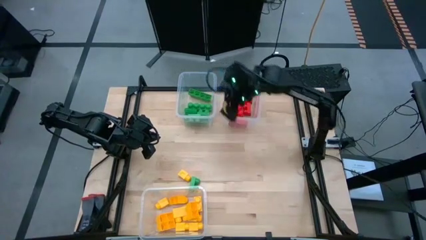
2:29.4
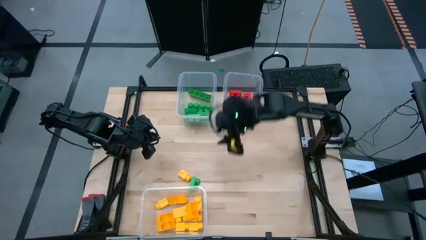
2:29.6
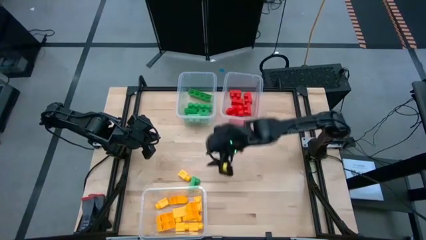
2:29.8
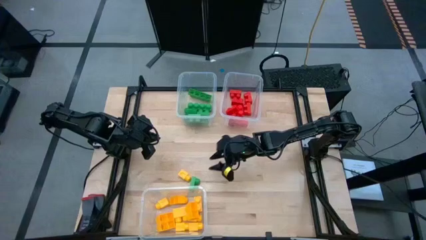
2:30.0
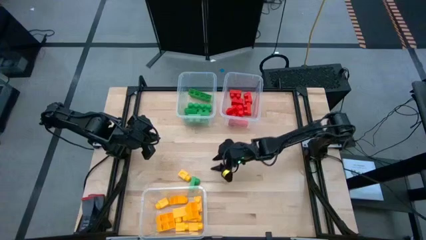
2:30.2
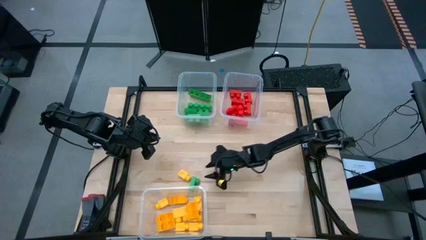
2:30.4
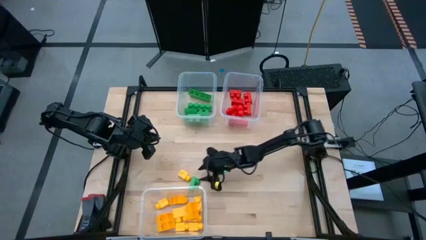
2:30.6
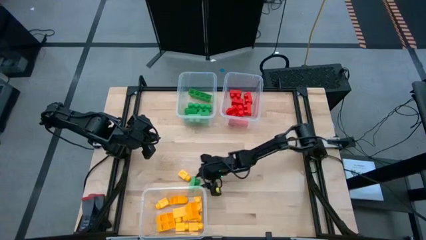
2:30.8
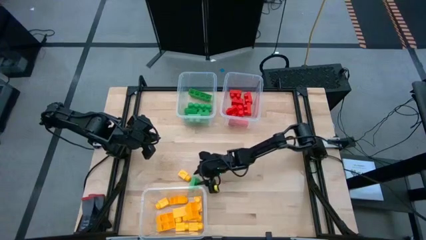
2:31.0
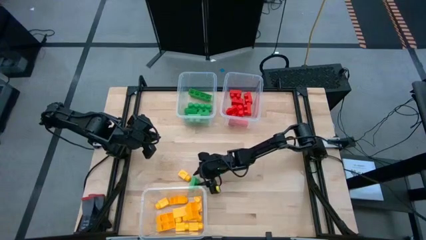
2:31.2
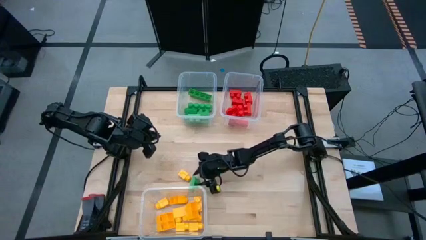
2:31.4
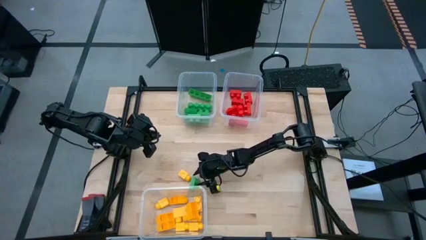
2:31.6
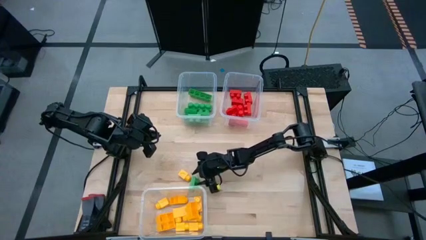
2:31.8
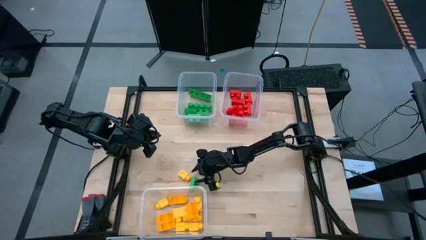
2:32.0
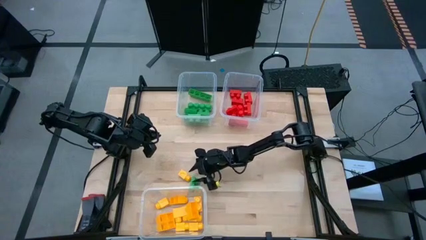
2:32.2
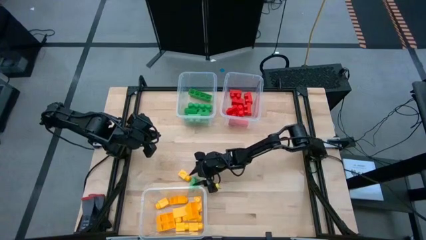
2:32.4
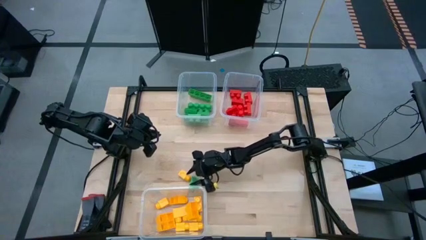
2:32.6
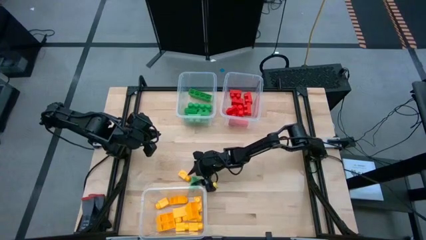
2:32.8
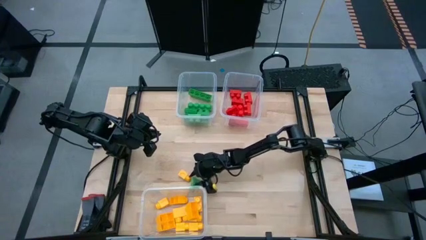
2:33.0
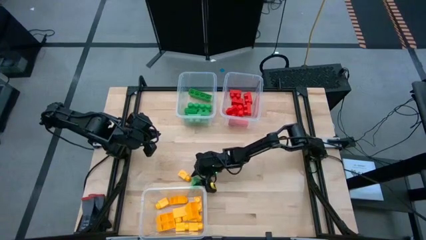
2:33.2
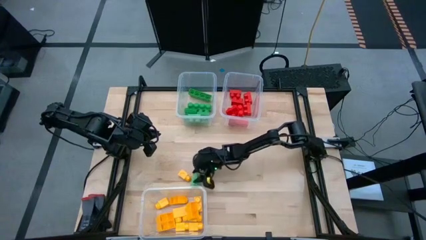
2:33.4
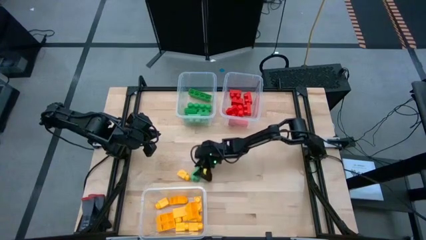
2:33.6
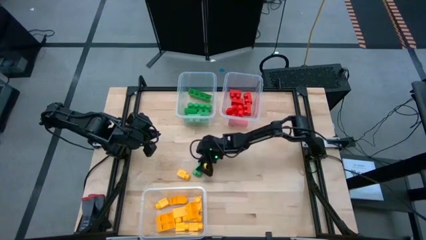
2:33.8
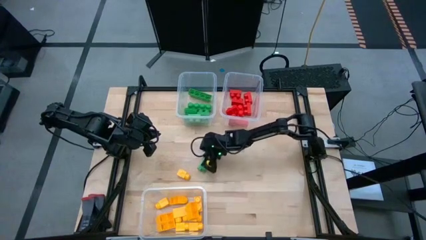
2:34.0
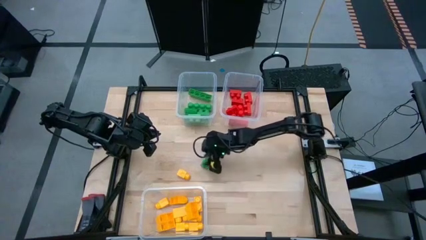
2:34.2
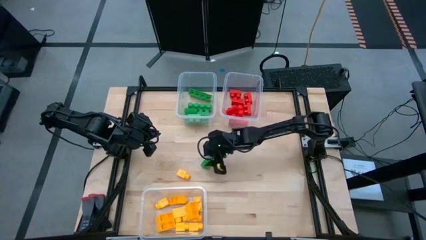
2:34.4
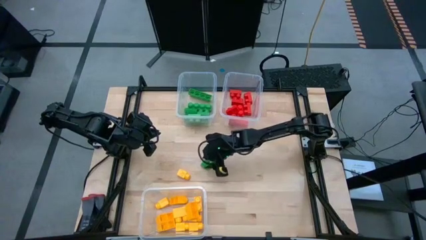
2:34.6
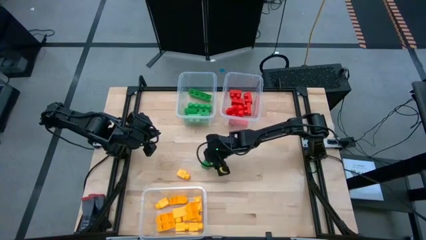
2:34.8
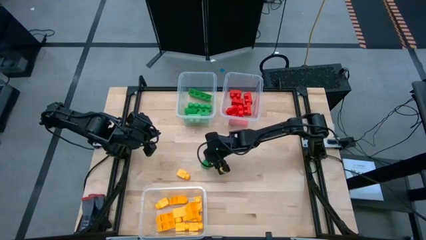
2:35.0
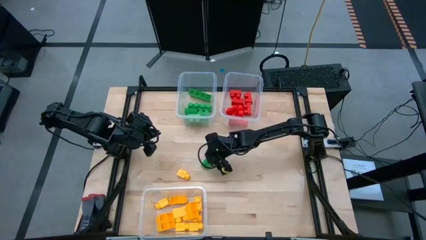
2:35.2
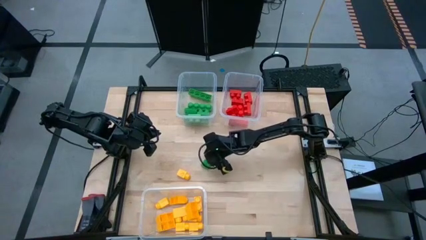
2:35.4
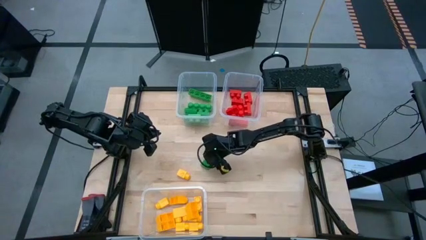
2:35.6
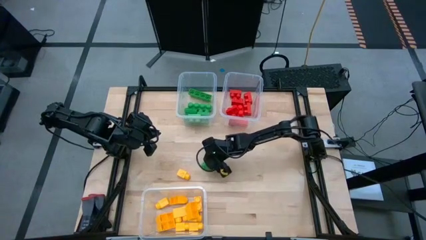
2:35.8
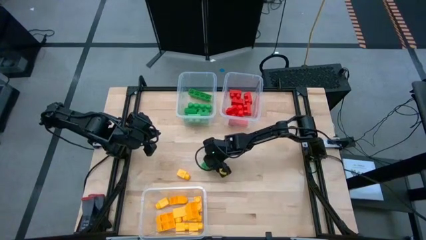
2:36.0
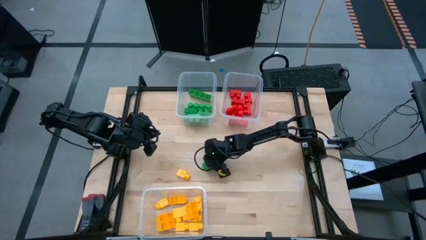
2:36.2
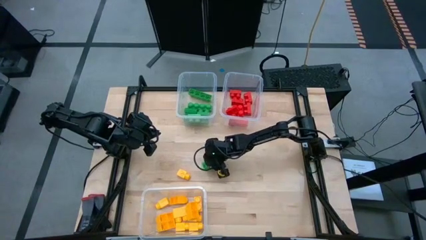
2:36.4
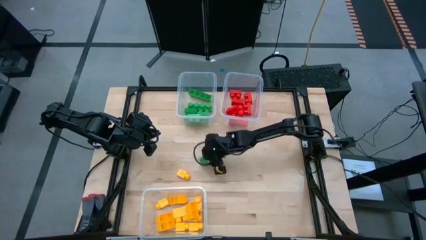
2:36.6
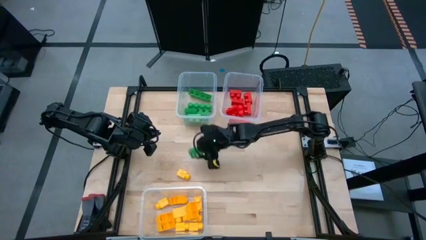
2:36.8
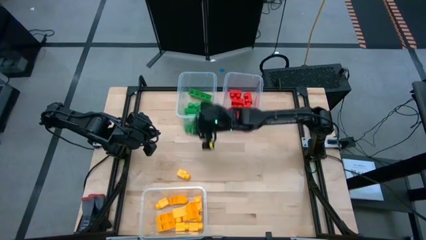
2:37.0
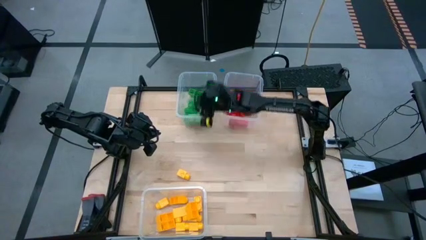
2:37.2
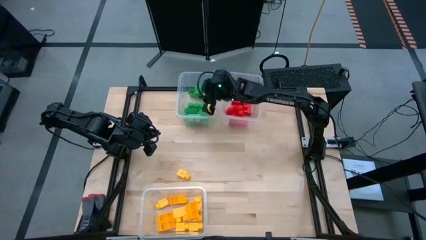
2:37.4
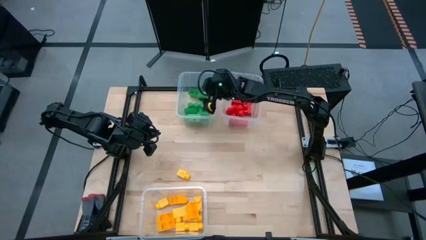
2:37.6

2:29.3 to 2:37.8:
Task: Sort blocks
Put the green game piece into the top left transparent bin

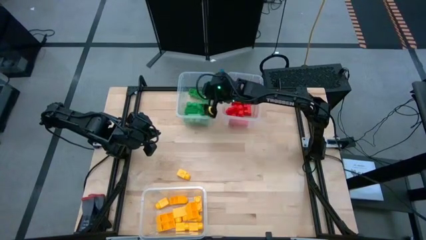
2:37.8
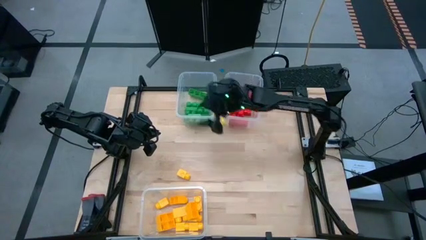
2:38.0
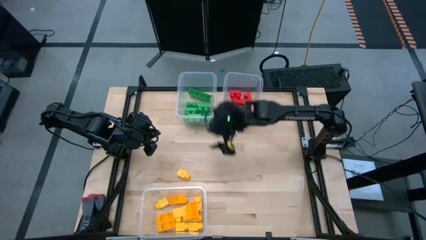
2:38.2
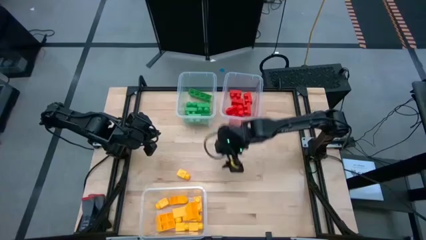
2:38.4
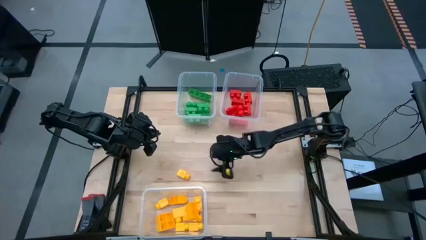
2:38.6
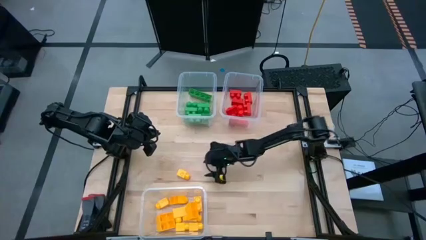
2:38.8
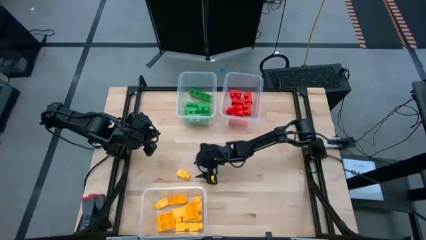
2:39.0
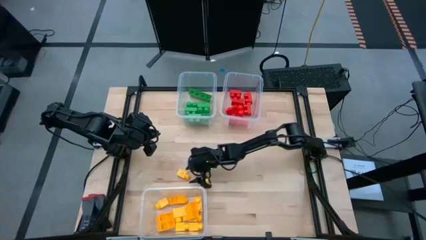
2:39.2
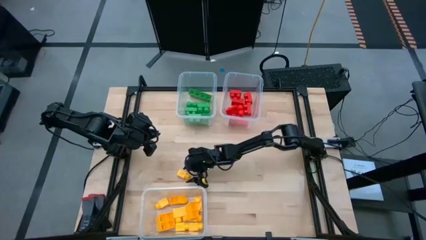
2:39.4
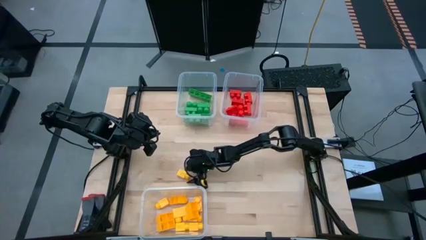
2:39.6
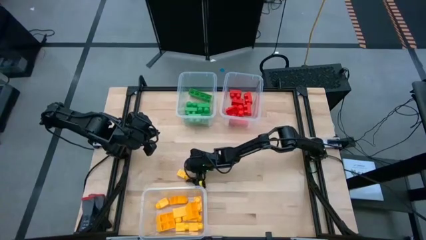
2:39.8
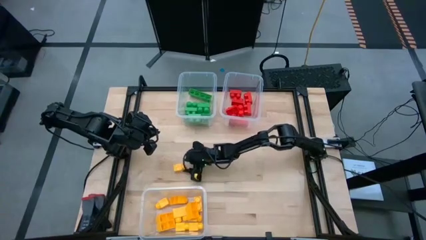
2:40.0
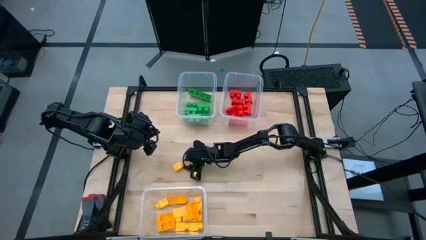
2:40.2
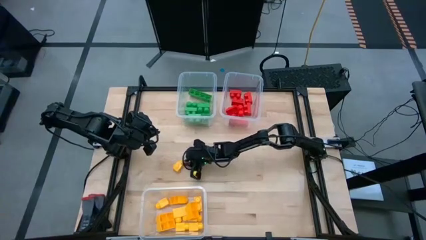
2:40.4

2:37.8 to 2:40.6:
Put the yellow game piece into the bottom transparent bin

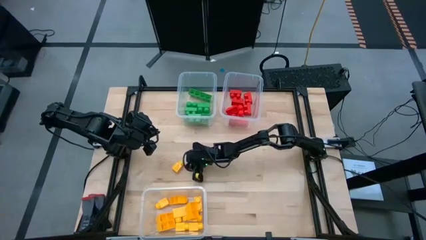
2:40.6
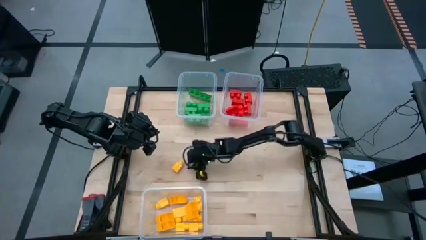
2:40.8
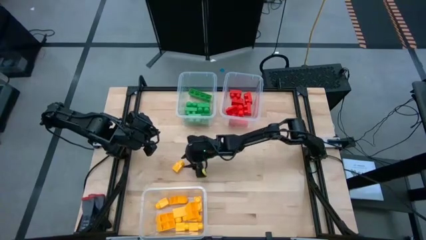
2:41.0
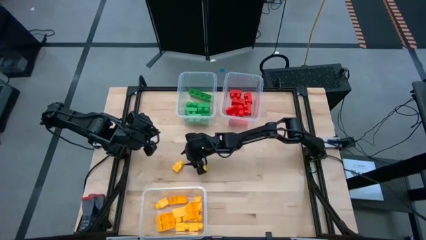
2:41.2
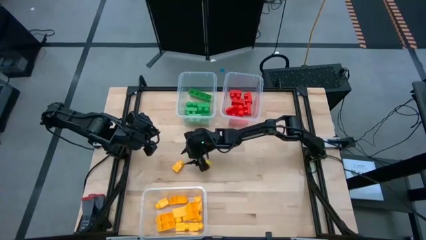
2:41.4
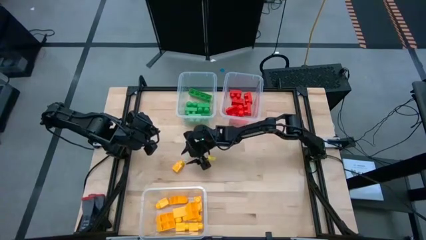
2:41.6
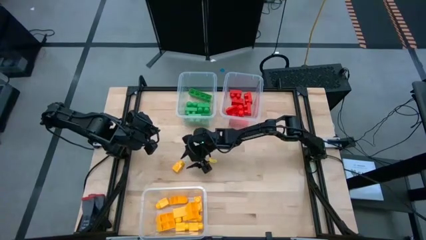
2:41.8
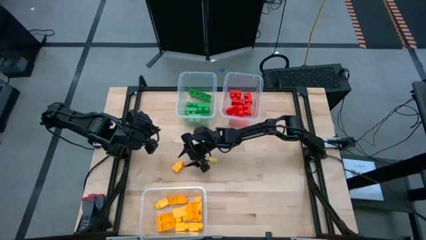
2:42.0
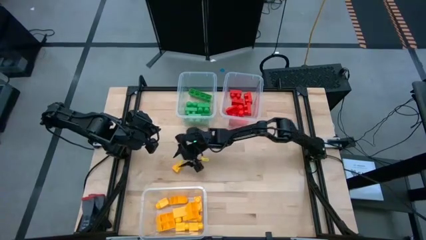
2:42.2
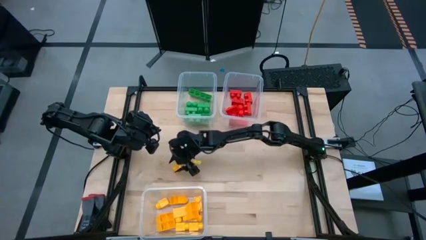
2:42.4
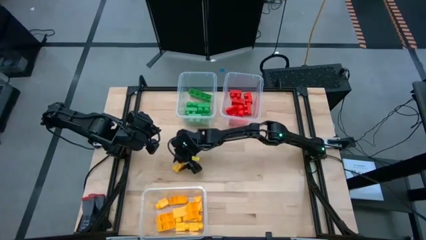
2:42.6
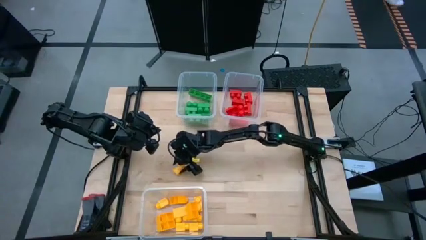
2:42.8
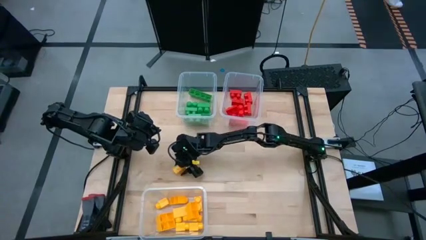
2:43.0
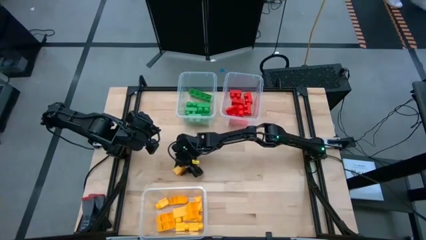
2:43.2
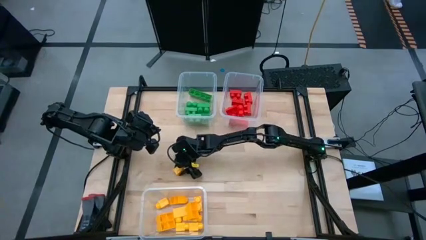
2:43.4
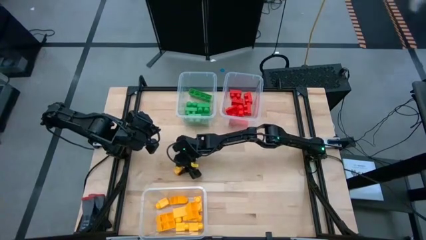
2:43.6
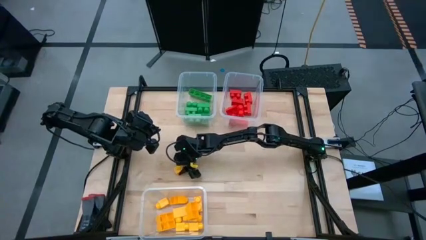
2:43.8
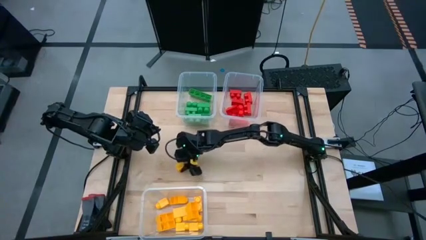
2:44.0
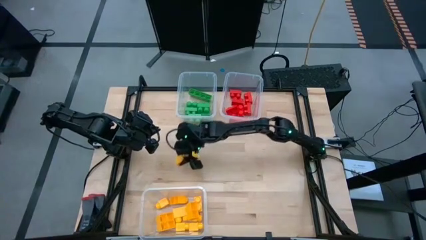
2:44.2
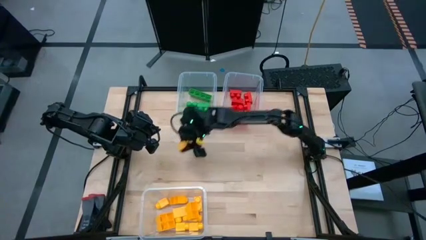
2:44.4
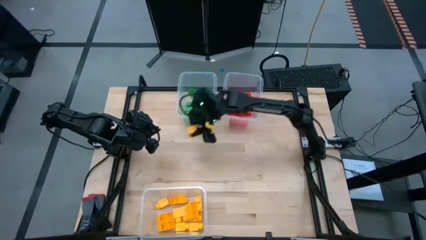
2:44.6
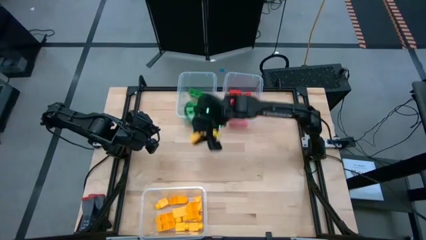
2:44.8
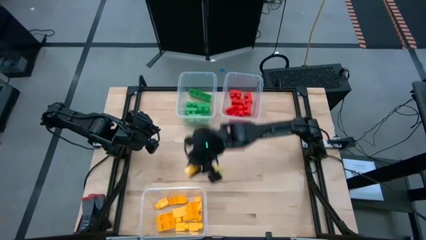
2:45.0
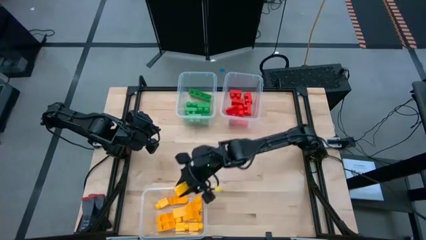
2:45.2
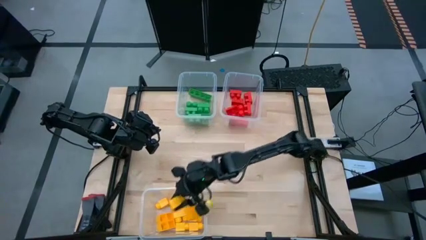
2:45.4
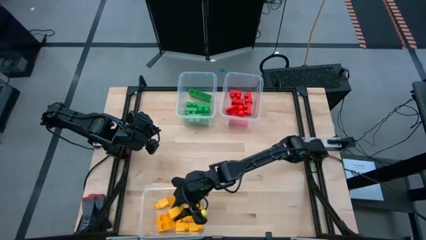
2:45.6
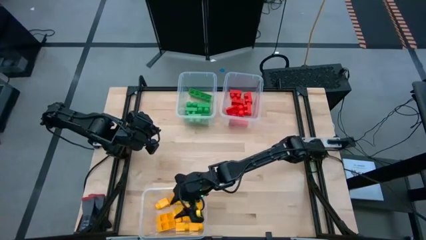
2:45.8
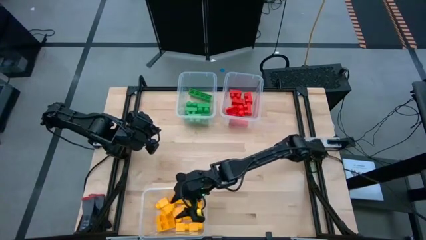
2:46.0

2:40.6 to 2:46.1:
Put the yellow game piece into the bottom transparent bin

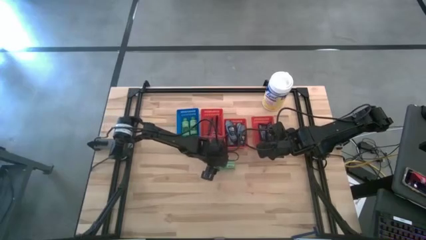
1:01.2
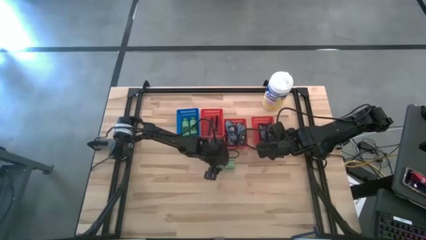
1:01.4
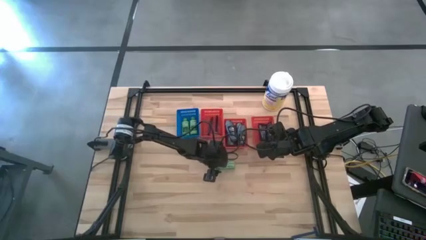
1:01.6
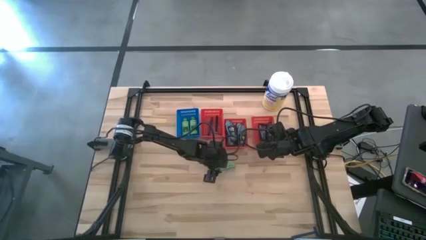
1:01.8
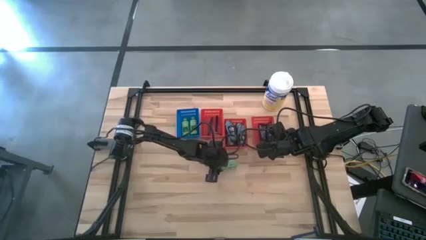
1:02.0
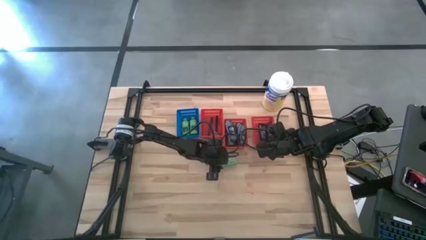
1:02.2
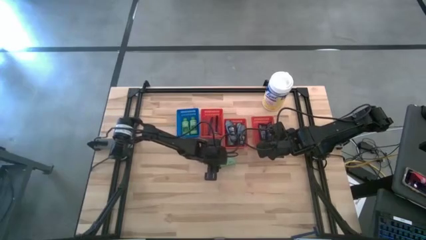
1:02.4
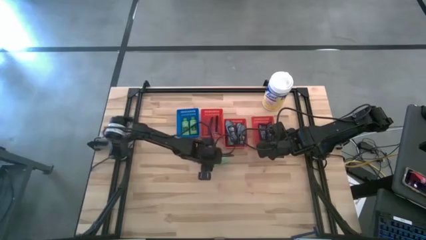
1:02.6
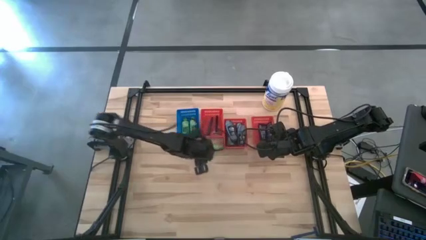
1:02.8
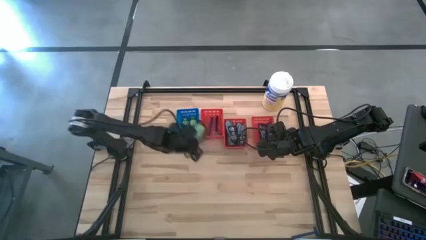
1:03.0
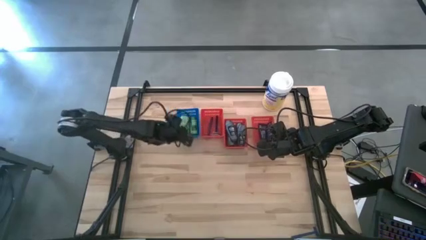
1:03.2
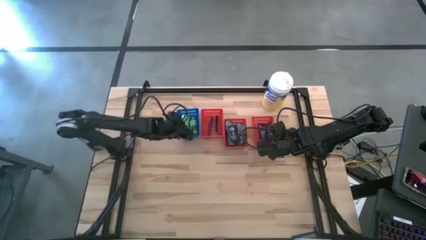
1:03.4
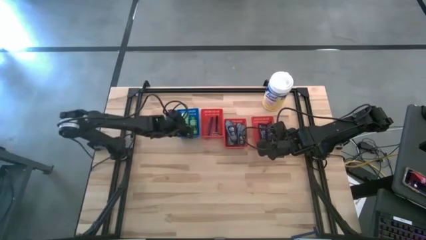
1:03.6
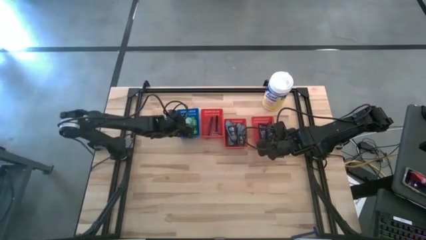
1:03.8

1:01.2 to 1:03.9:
Task: Pick & Place Travel size toiletries
Put the green shampoo into the blue bin
